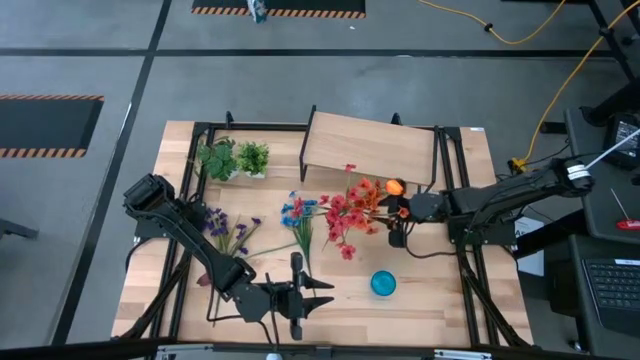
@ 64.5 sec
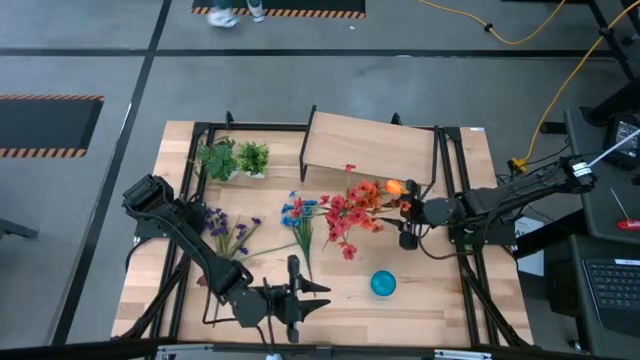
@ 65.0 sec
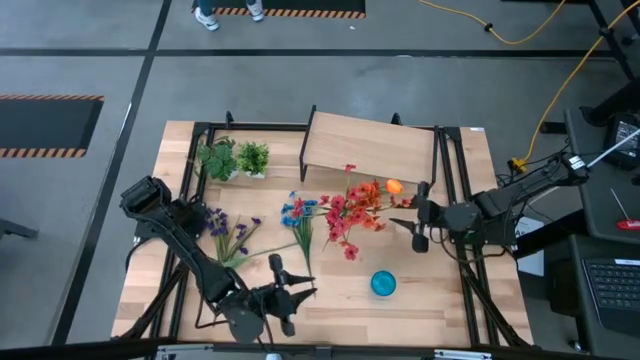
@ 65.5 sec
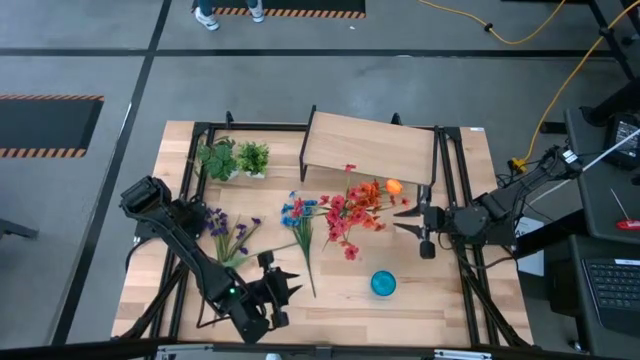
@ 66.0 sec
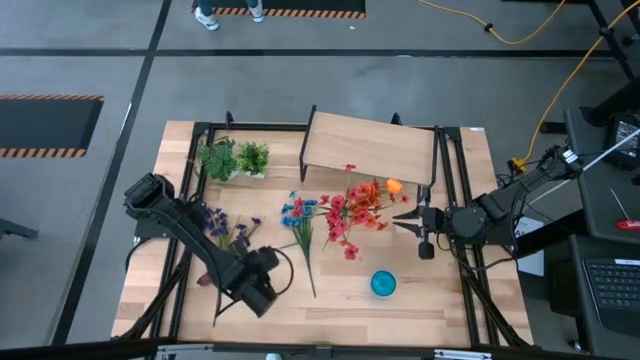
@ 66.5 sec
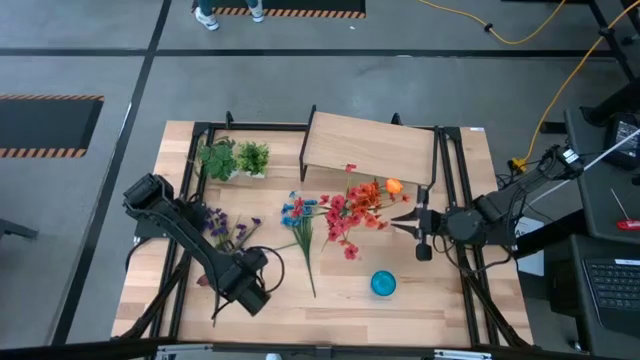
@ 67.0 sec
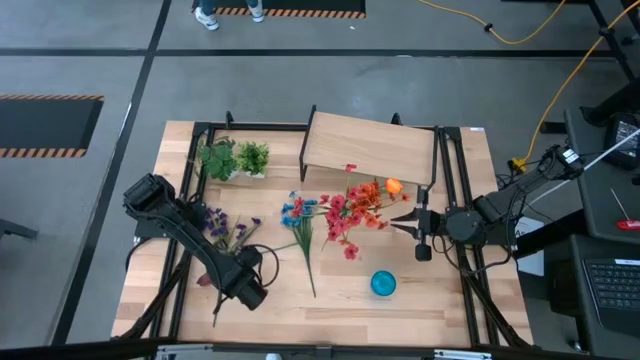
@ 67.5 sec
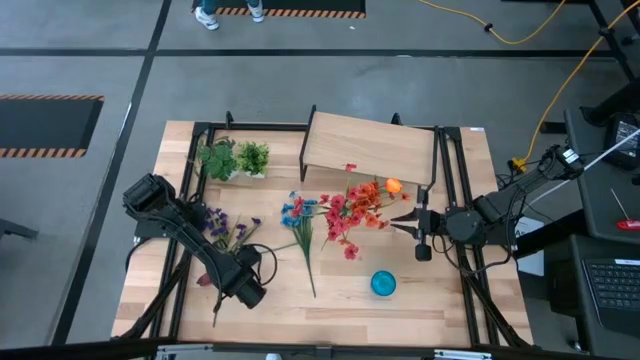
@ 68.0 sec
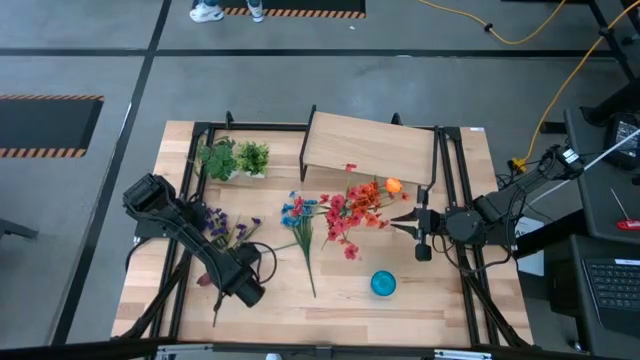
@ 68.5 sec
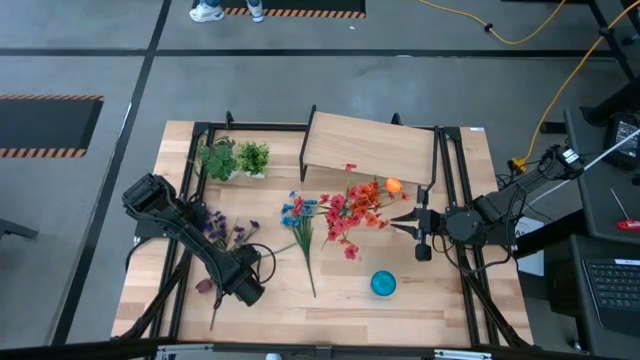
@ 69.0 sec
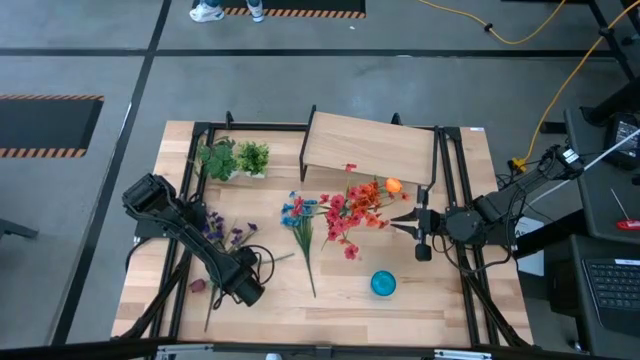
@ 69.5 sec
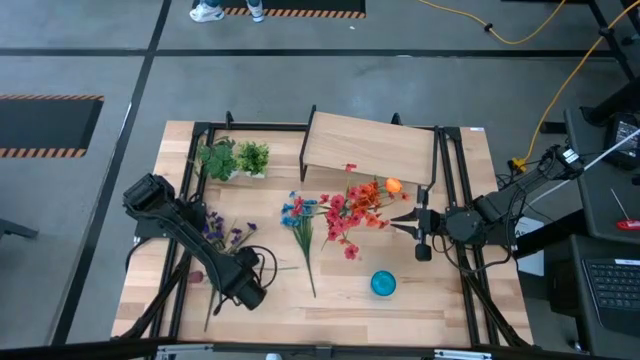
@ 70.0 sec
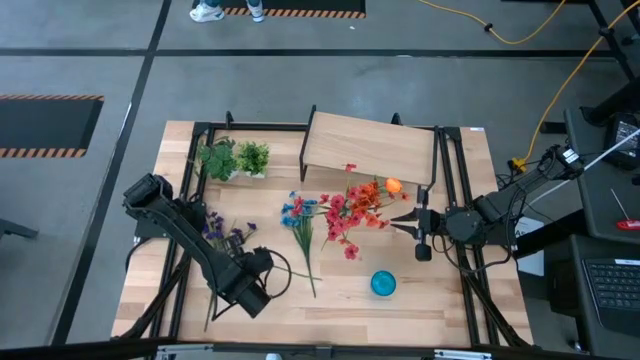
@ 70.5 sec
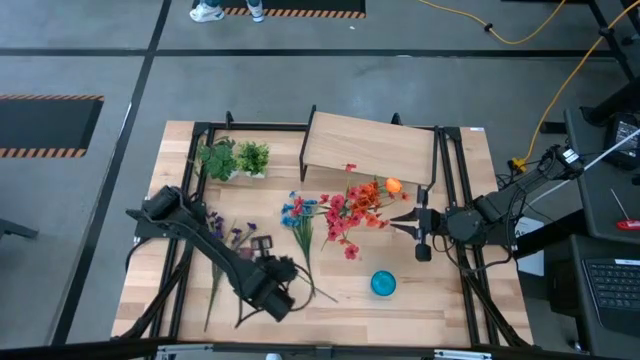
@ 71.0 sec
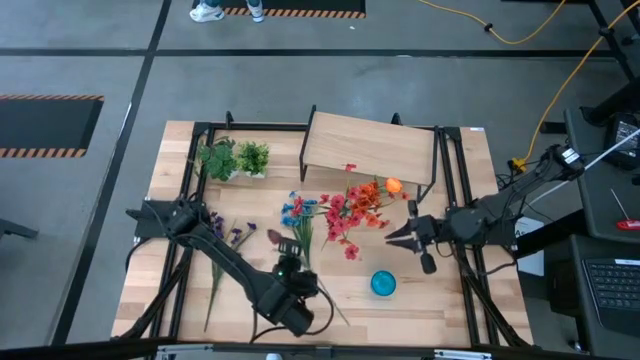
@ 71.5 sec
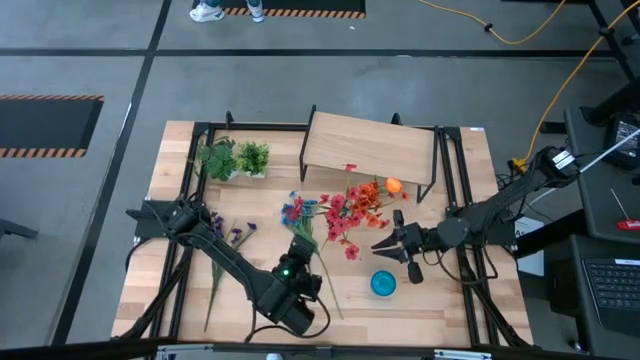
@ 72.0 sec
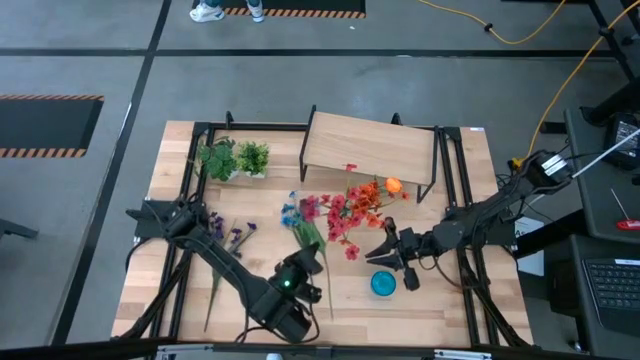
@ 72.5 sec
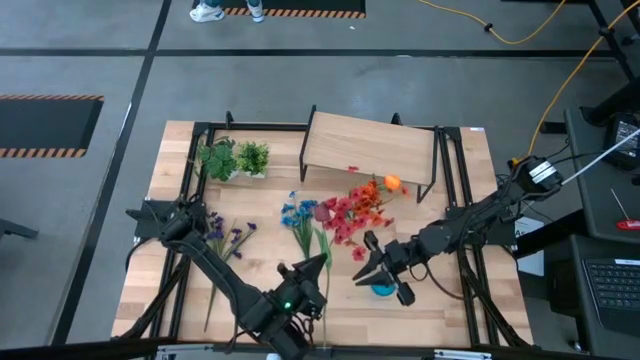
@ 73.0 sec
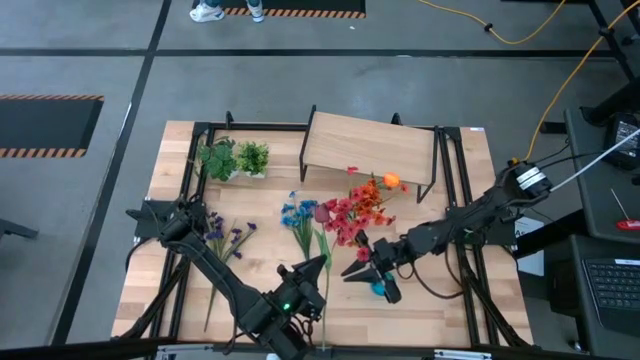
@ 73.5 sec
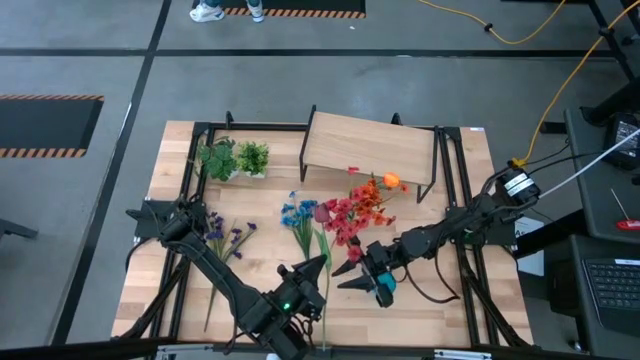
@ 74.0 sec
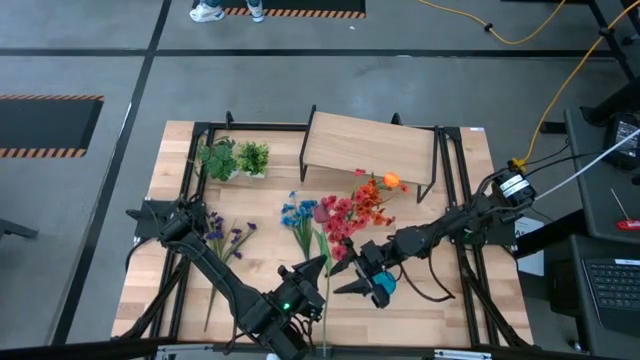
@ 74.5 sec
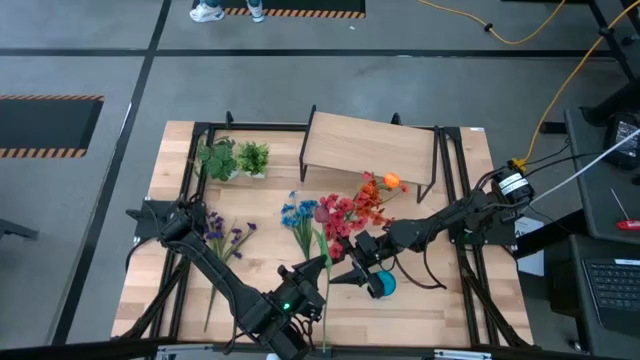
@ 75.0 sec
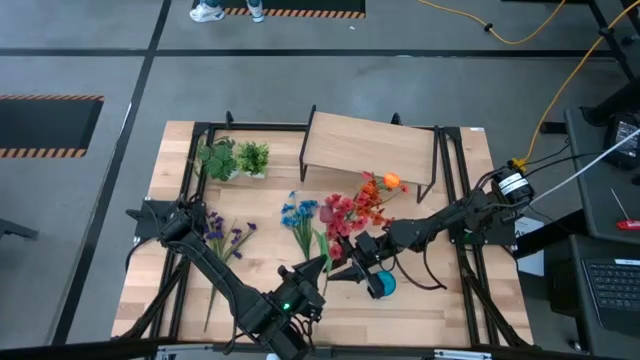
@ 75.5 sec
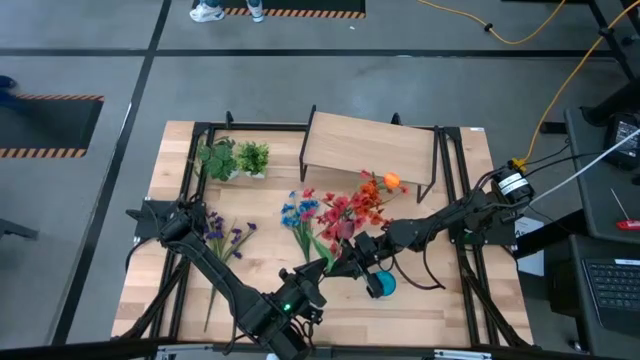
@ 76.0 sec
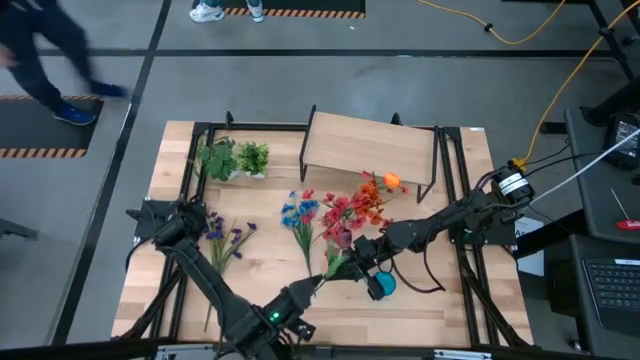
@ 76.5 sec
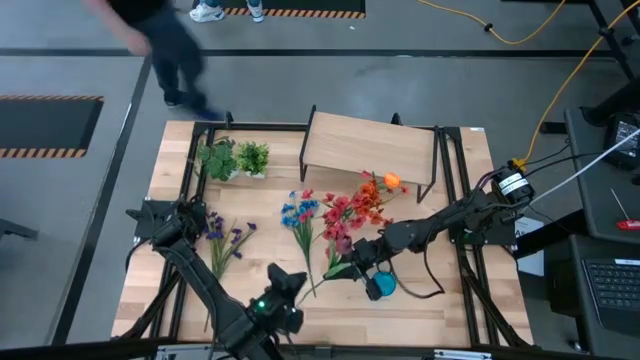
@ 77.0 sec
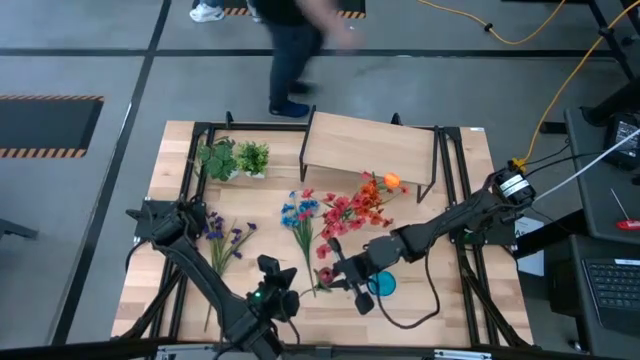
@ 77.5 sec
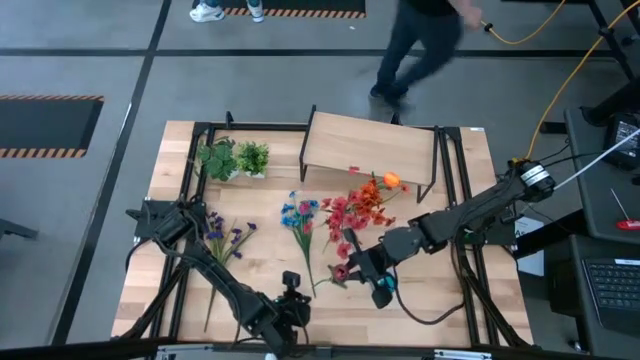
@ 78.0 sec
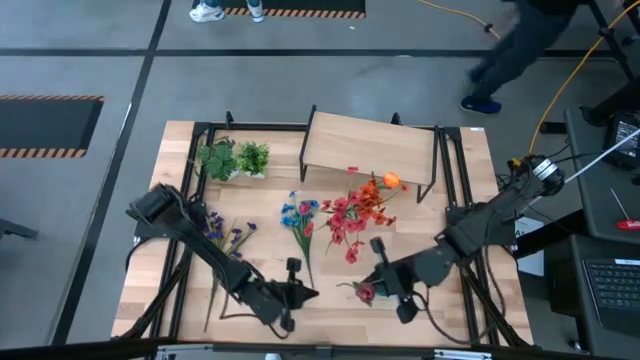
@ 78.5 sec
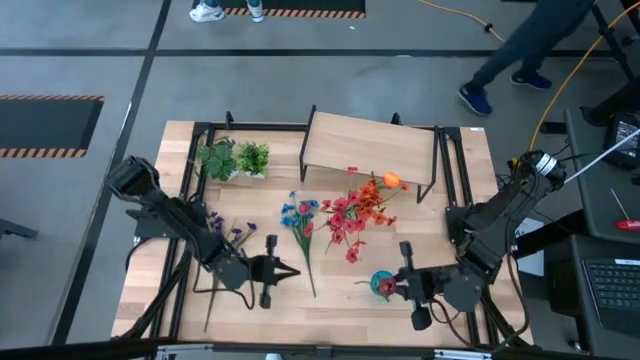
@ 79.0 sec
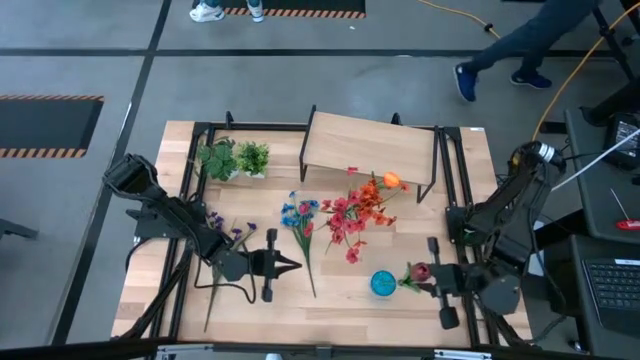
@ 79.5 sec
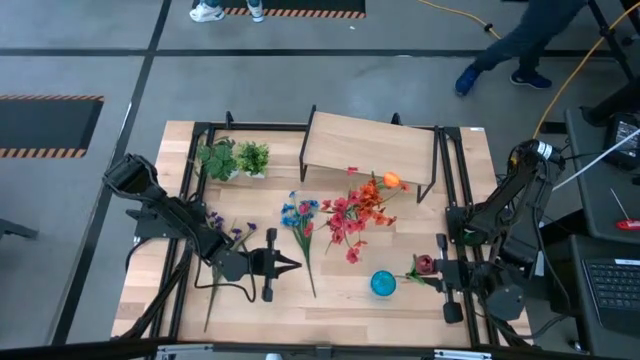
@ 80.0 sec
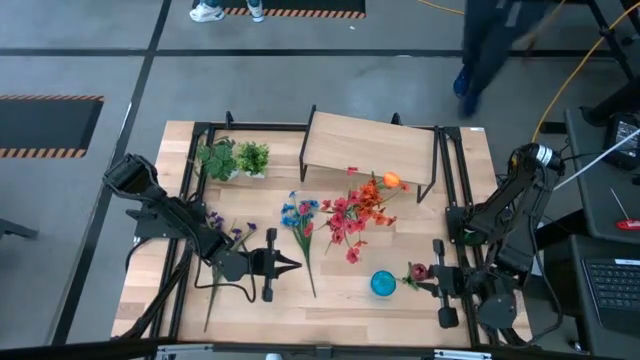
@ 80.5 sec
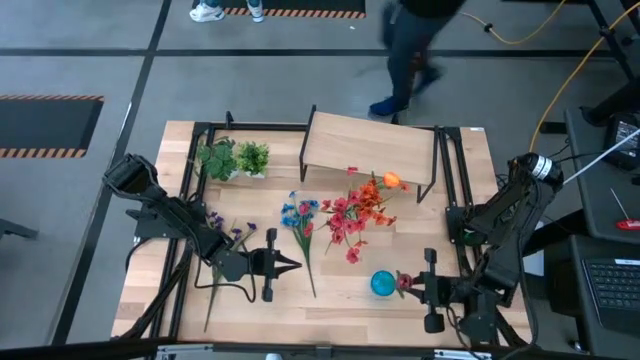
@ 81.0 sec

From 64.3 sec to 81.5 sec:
Task: Pick and place flowers into a vace then onto a shelf
Put the dark red tulip into the blue vase
